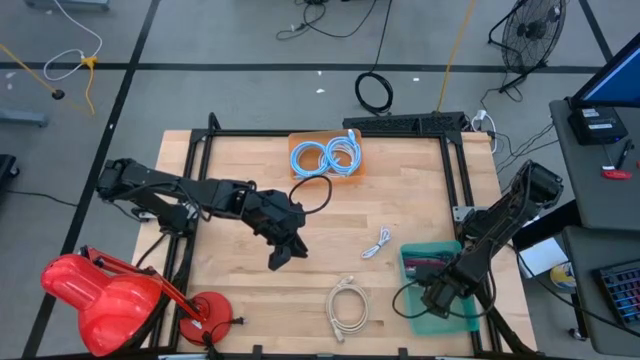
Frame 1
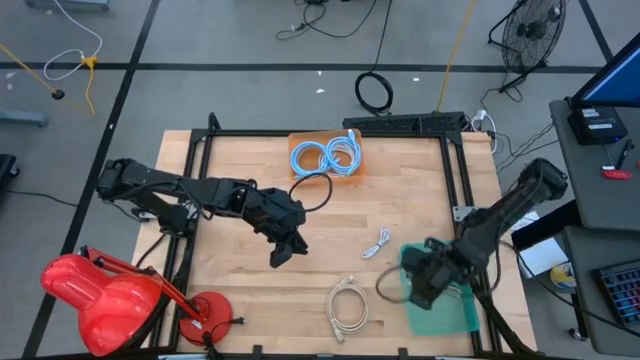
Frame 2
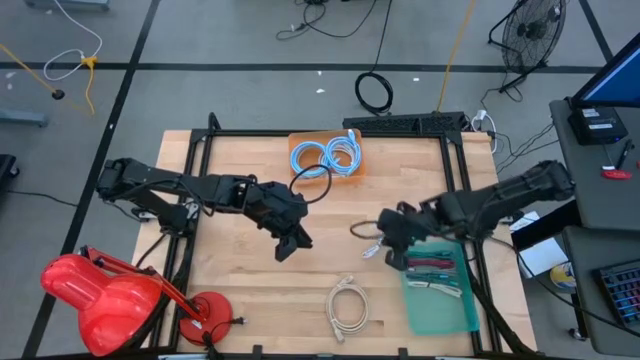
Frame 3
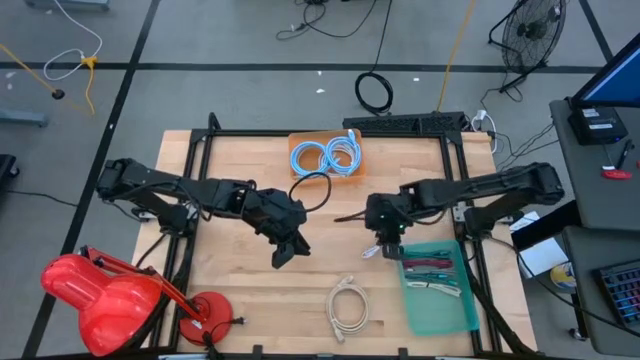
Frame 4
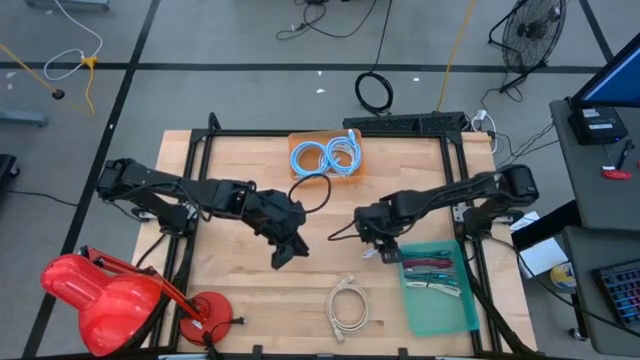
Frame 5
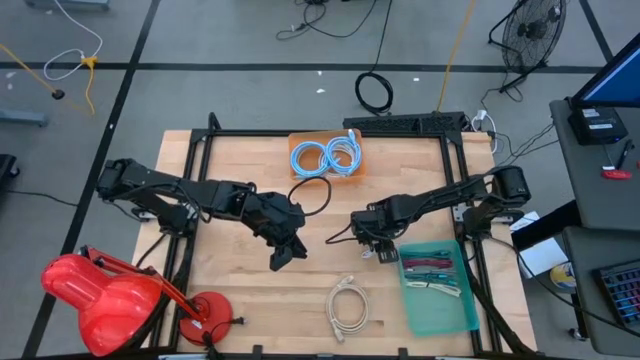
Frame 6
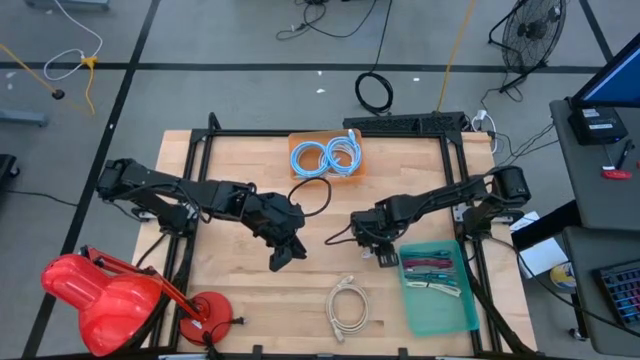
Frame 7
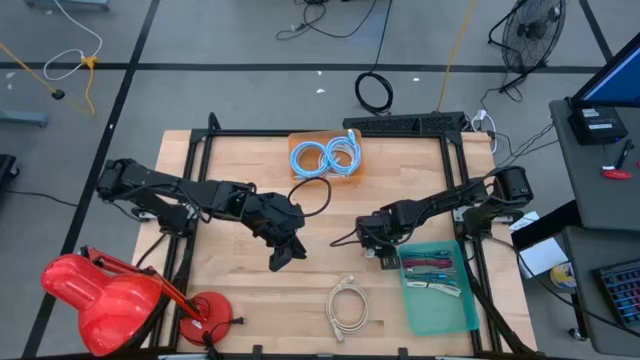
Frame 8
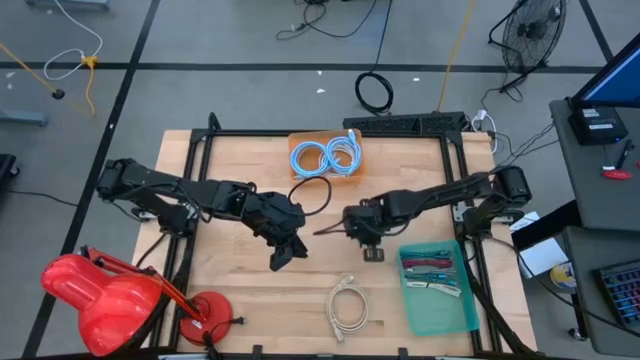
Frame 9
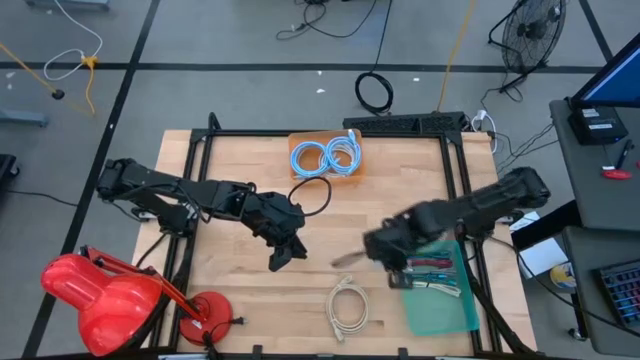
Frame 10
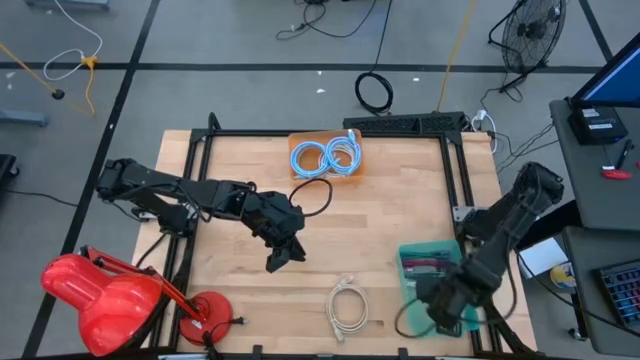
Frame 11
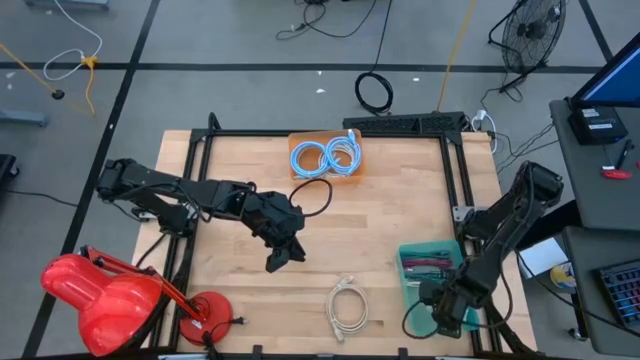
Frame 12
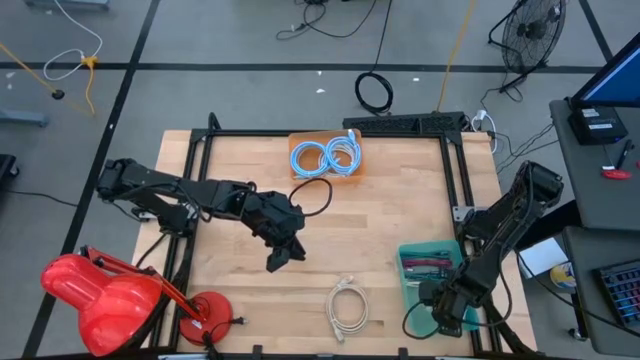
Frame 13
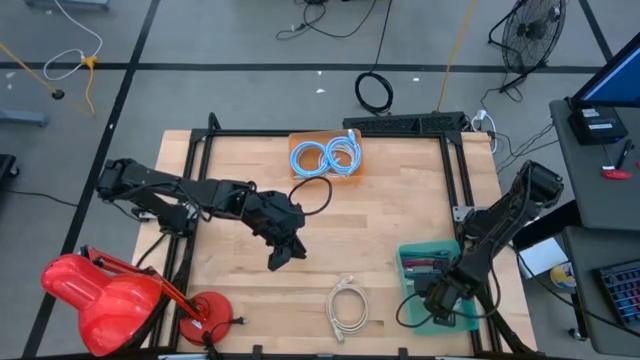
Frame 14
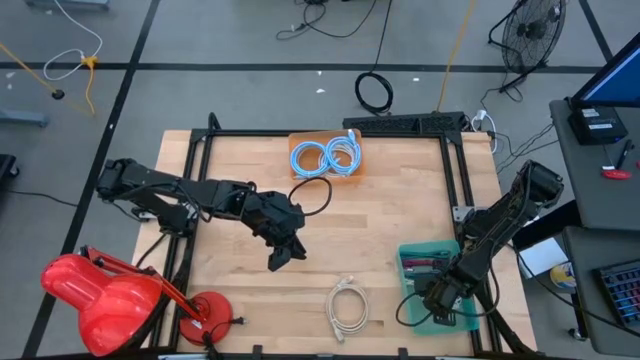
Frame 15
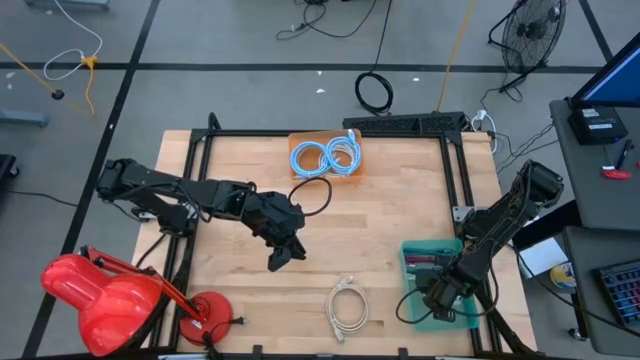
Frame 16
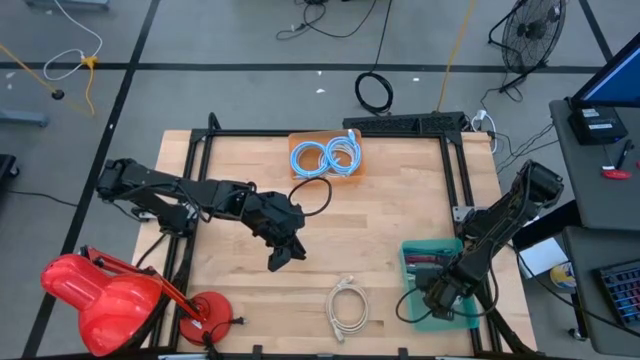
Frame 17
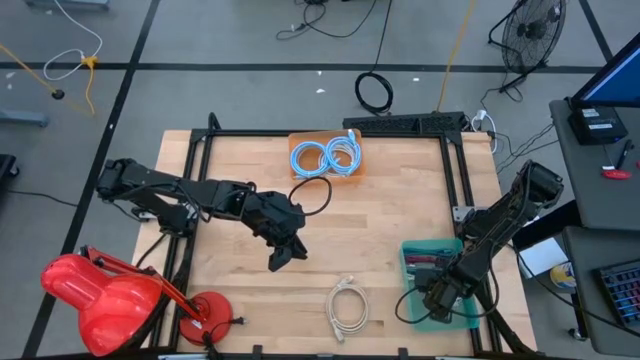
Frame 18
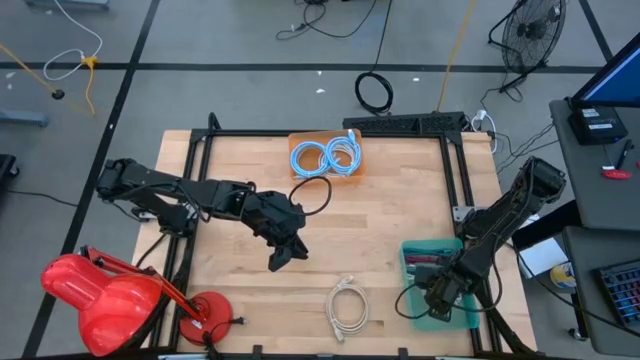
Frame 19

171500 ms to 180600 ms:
Task: Pick & Place USB Port
Put the small white charger cable into the green bin

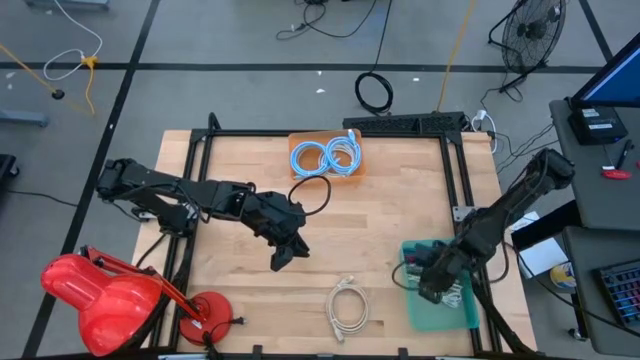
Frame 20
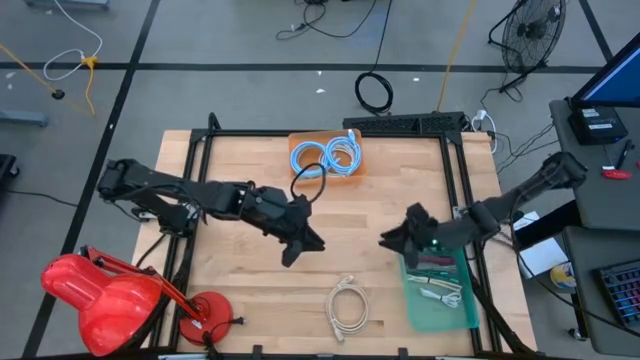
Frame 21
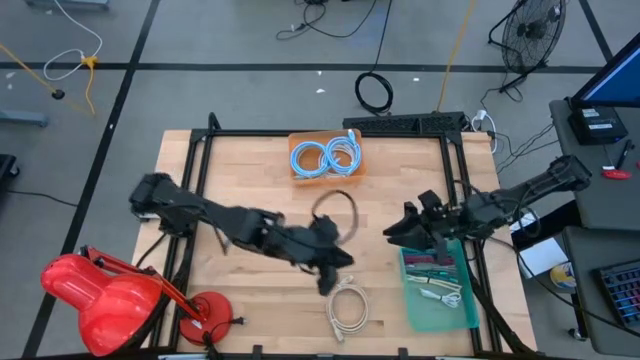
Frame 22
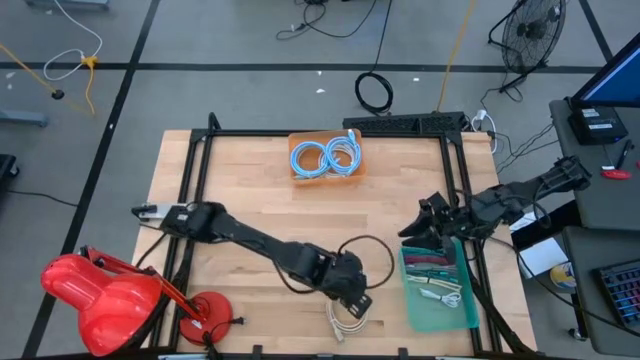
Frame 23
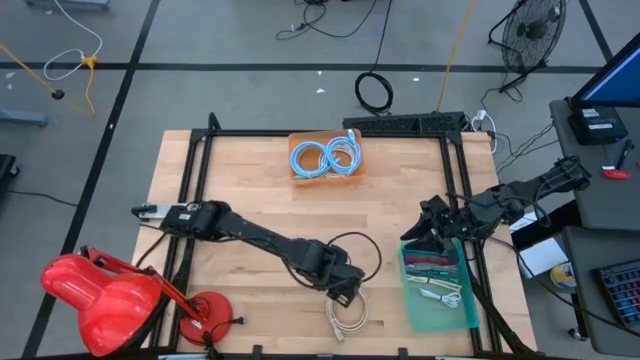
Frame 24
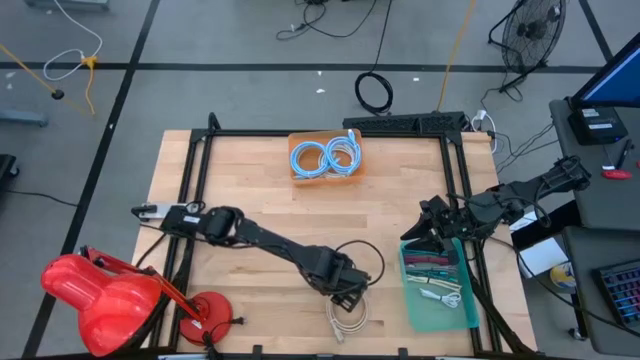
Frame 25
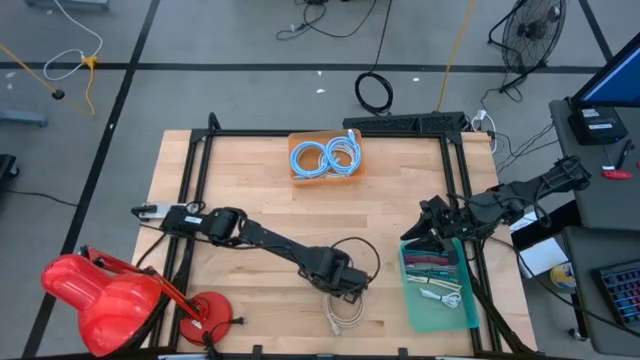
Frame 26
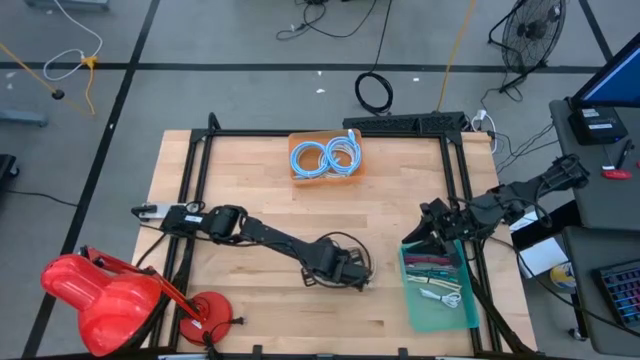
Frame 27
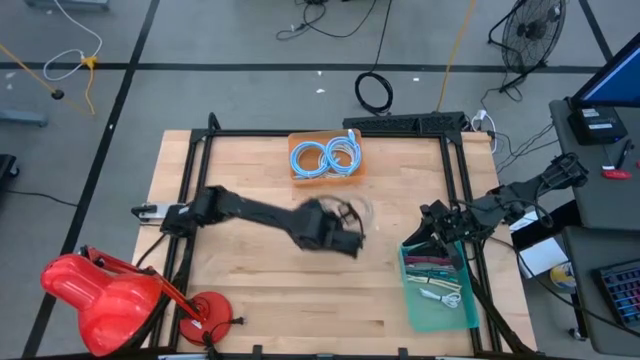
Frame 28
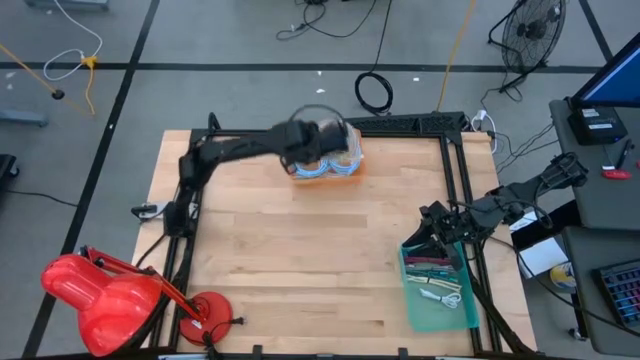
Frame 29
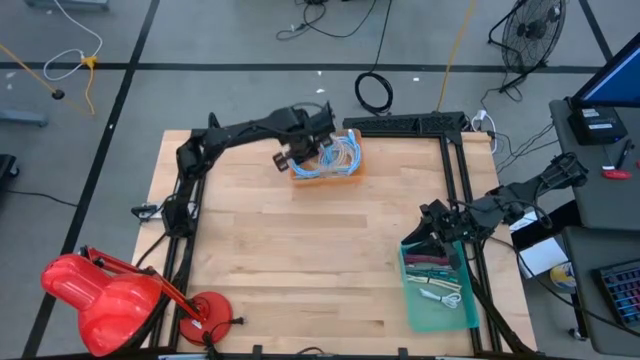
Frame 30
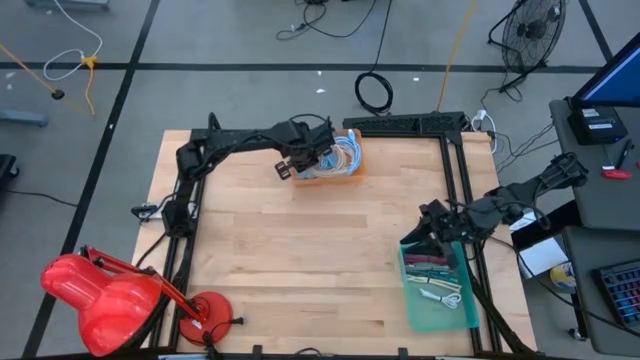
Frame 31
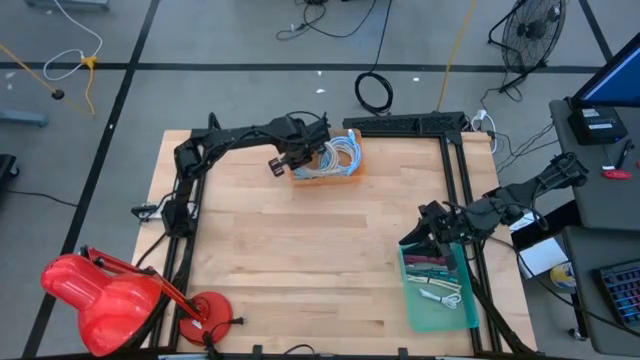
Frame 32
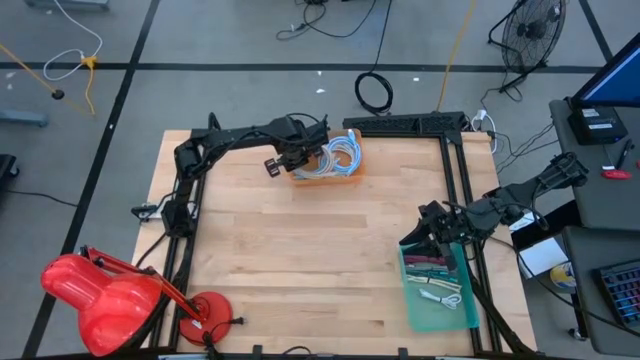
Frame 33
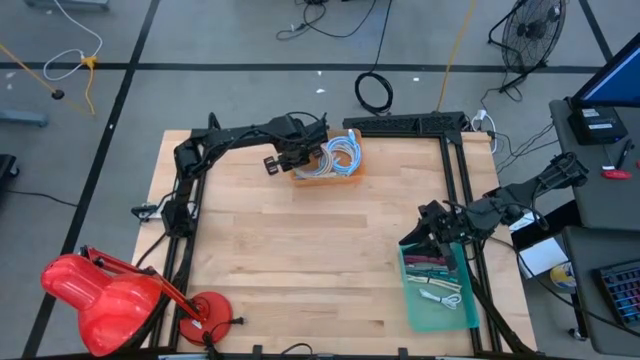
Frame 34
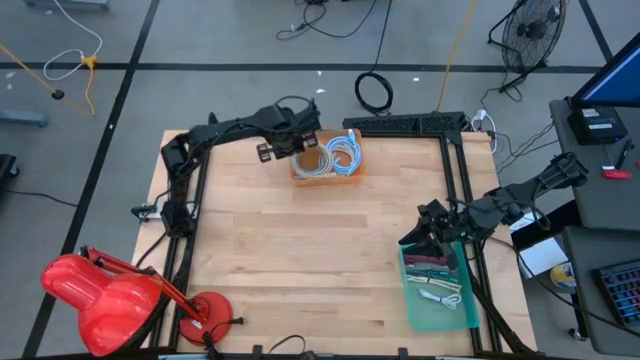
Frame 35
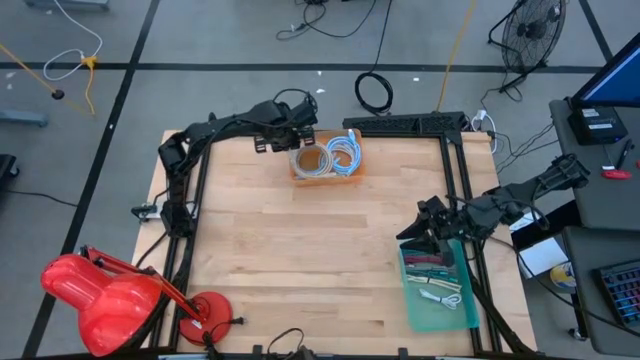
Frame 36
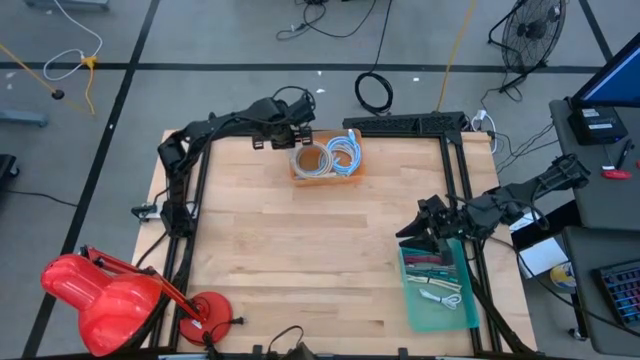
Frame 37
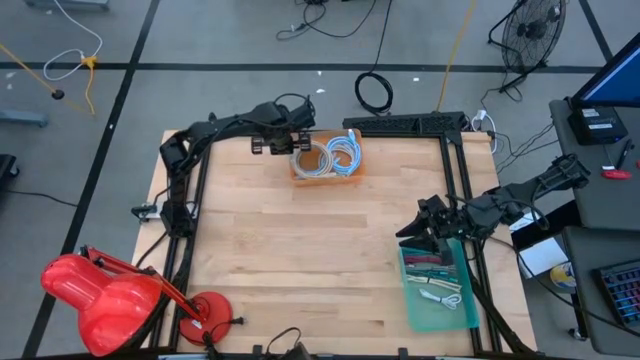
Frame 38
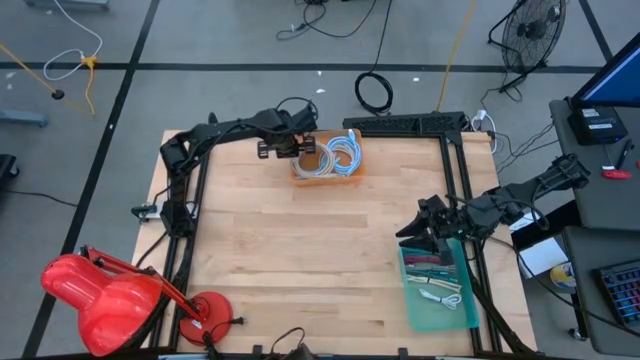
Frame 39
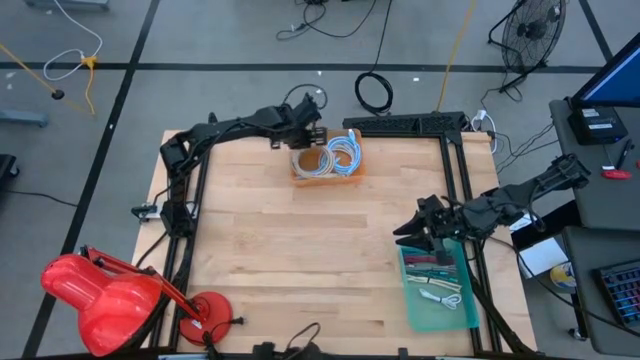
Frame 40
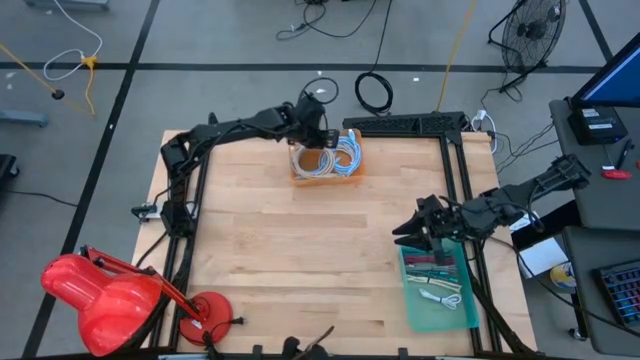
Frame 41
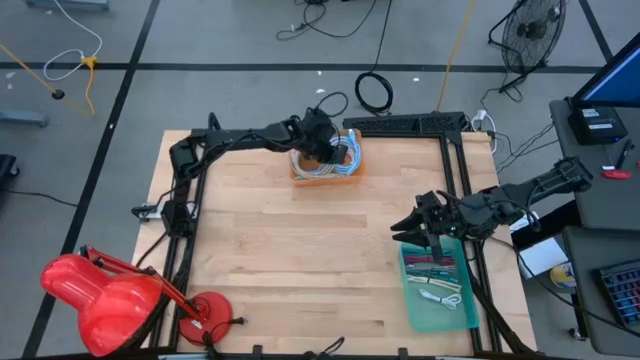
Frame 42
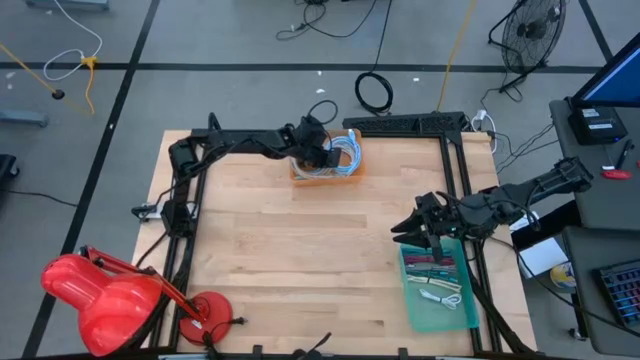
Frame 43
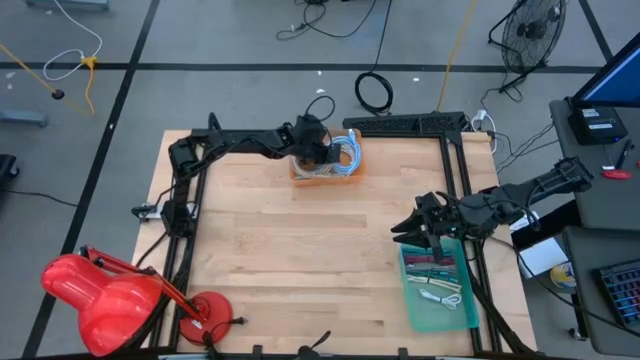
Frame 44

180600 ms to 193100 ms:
Put the large brown charger cable into the orange bin
